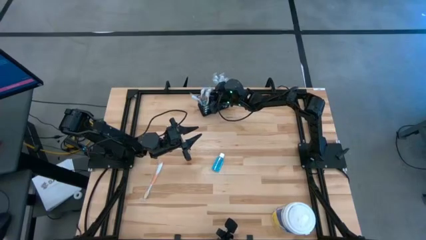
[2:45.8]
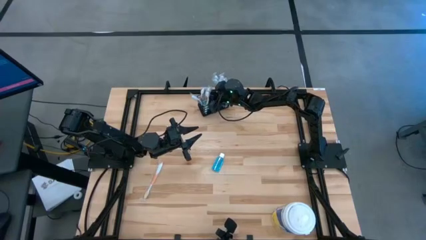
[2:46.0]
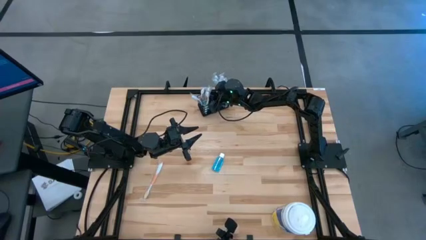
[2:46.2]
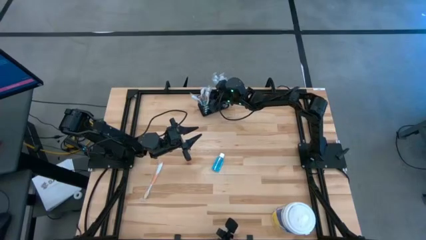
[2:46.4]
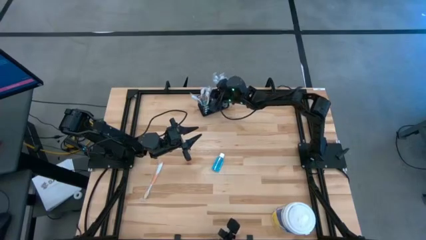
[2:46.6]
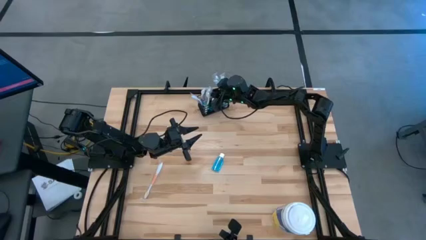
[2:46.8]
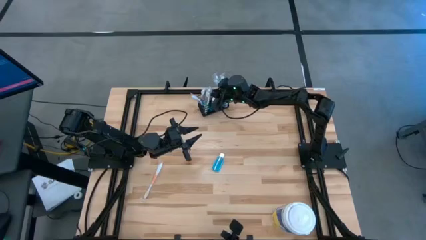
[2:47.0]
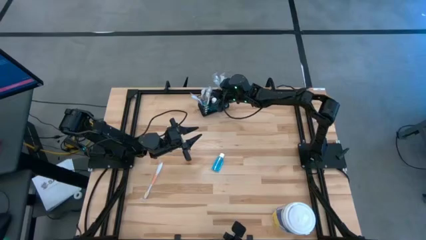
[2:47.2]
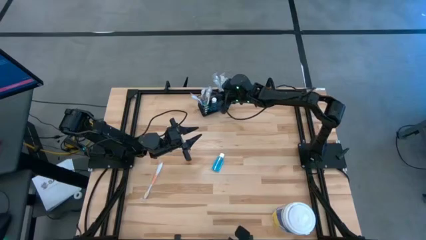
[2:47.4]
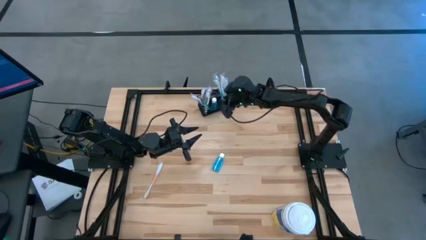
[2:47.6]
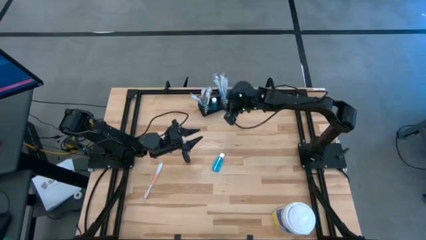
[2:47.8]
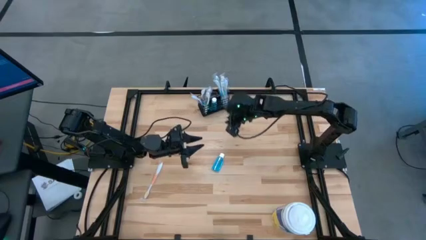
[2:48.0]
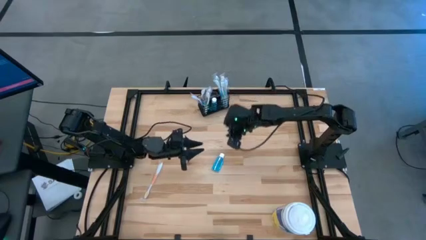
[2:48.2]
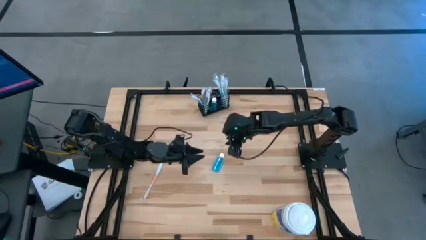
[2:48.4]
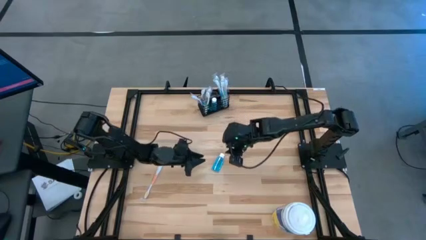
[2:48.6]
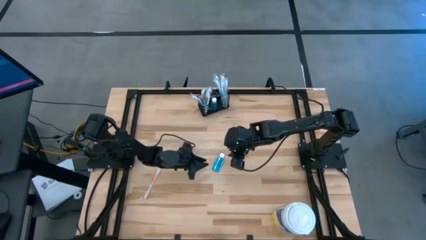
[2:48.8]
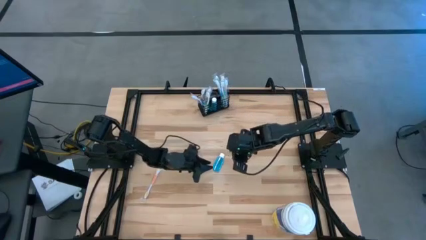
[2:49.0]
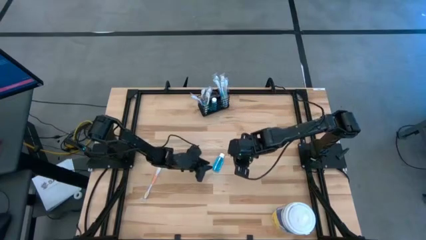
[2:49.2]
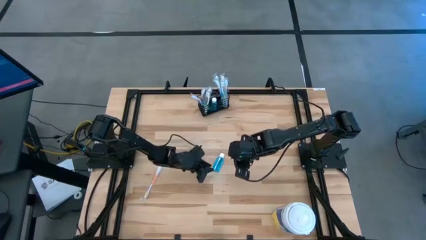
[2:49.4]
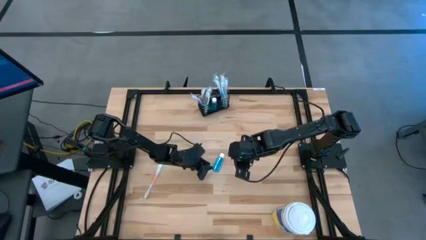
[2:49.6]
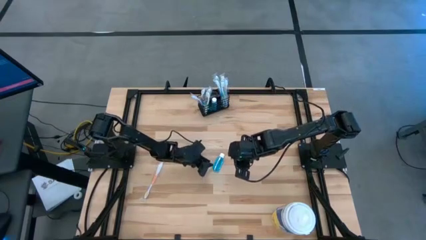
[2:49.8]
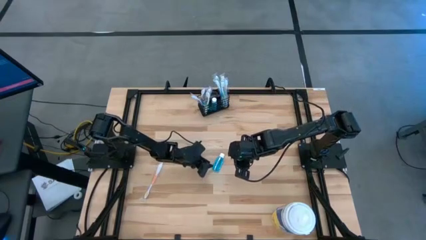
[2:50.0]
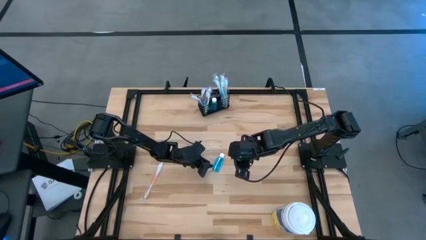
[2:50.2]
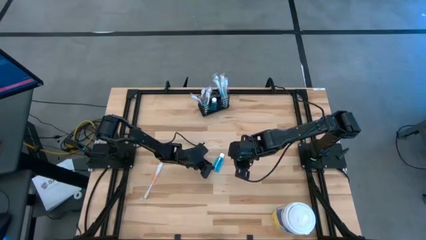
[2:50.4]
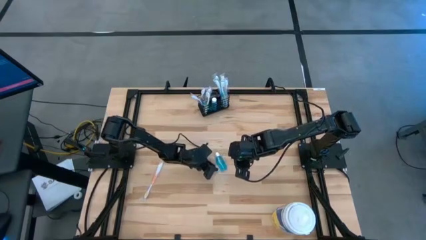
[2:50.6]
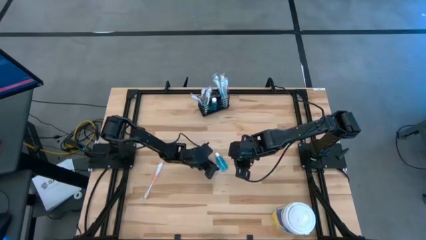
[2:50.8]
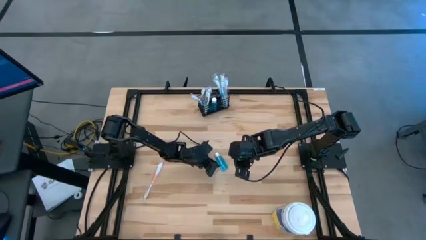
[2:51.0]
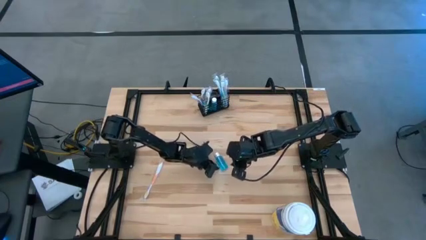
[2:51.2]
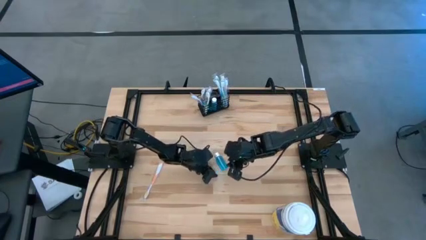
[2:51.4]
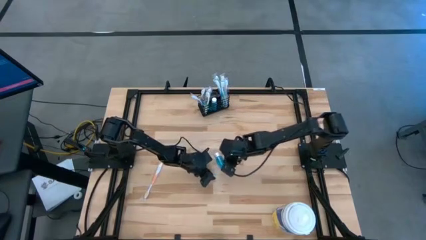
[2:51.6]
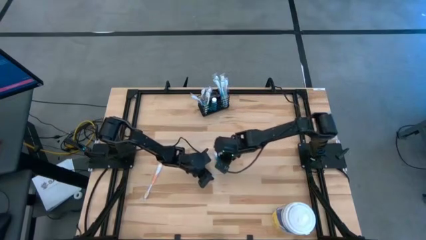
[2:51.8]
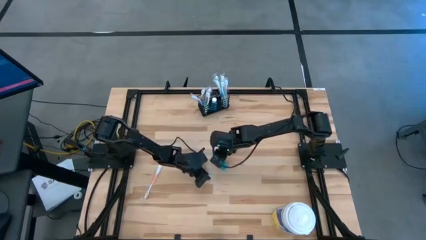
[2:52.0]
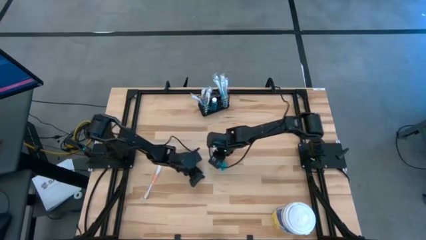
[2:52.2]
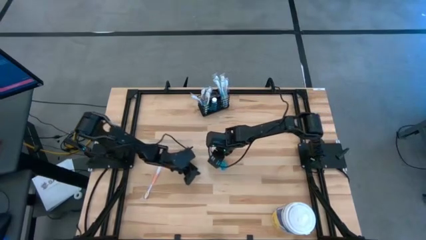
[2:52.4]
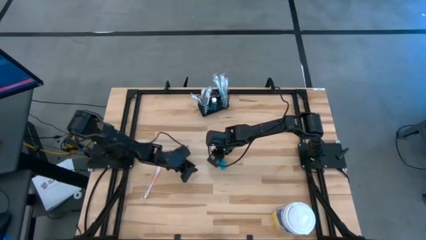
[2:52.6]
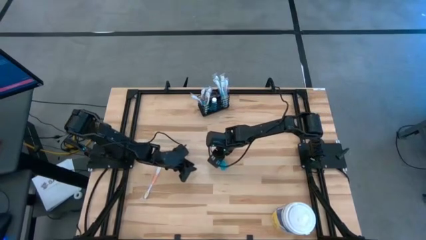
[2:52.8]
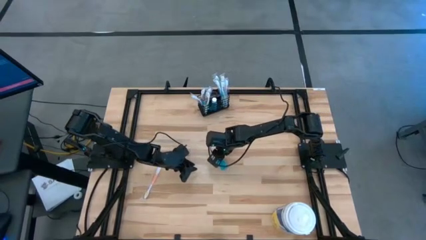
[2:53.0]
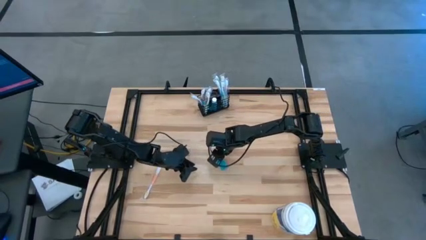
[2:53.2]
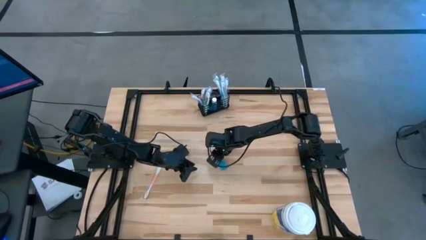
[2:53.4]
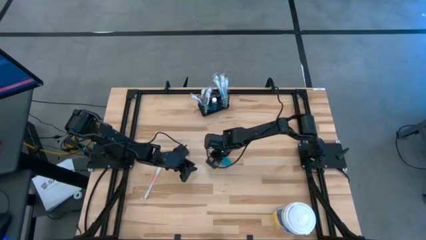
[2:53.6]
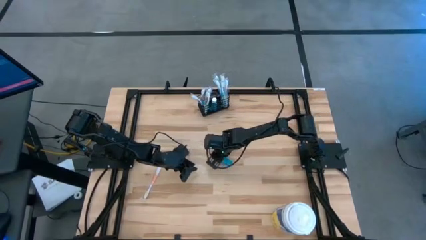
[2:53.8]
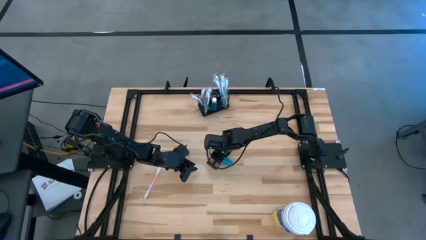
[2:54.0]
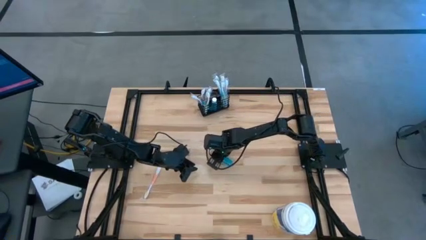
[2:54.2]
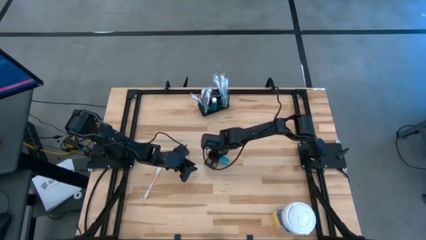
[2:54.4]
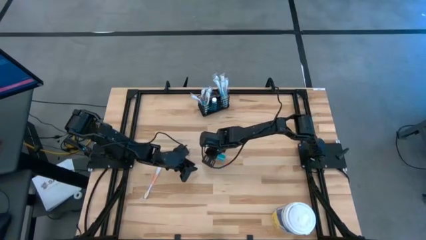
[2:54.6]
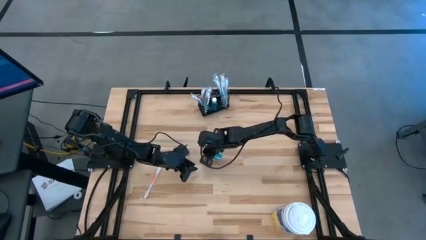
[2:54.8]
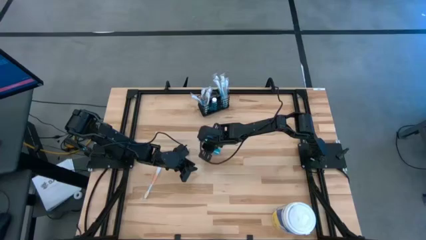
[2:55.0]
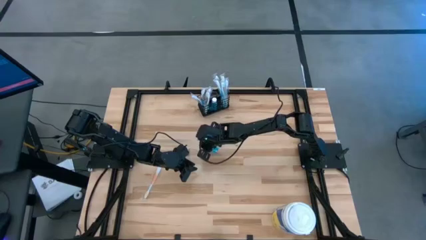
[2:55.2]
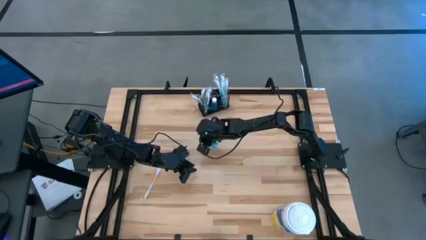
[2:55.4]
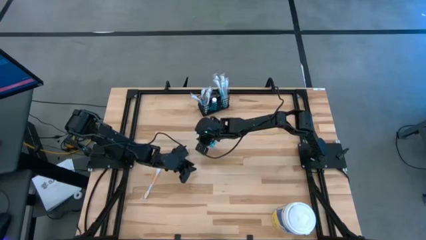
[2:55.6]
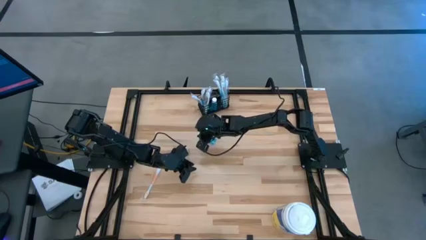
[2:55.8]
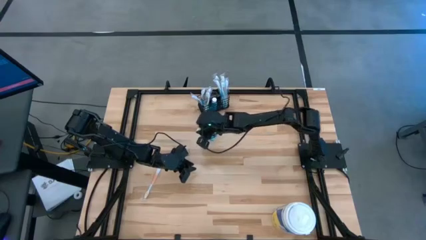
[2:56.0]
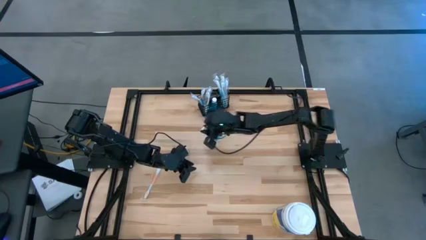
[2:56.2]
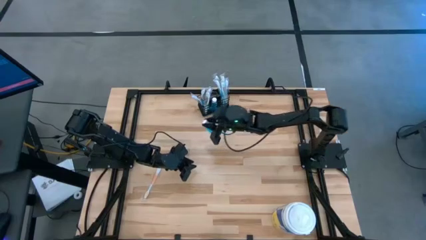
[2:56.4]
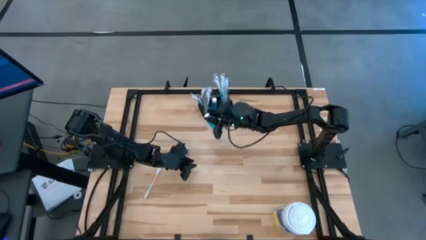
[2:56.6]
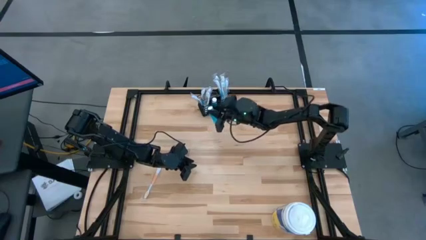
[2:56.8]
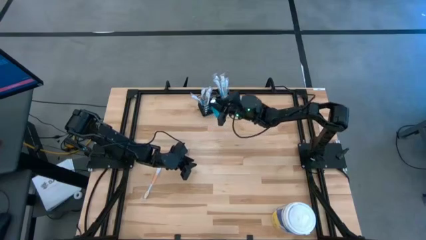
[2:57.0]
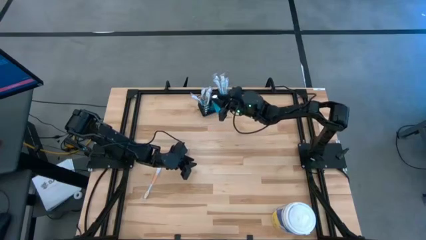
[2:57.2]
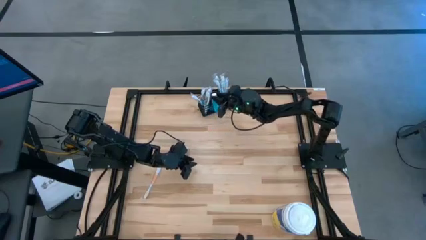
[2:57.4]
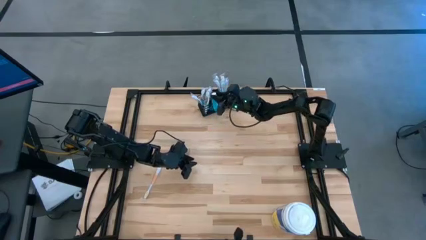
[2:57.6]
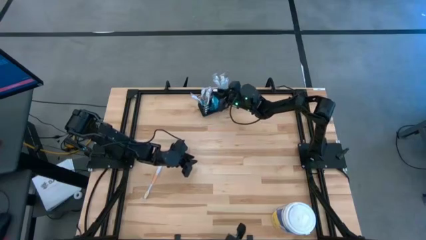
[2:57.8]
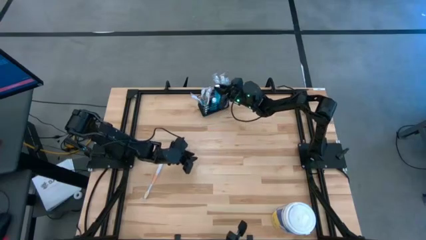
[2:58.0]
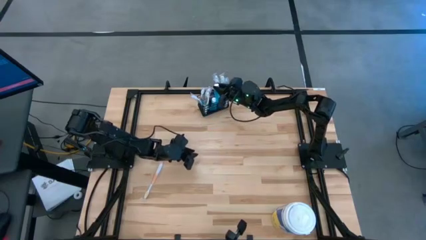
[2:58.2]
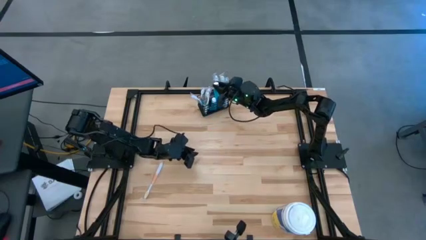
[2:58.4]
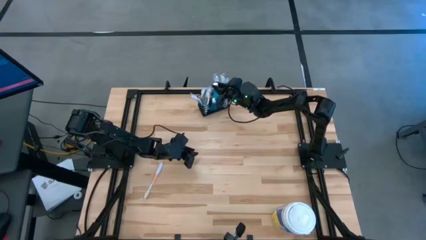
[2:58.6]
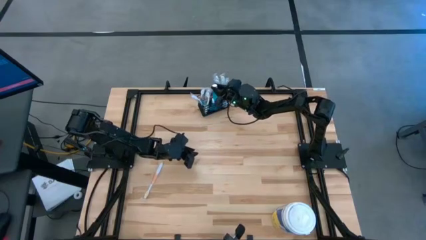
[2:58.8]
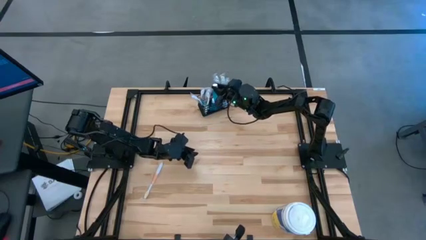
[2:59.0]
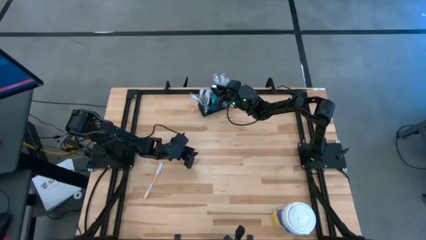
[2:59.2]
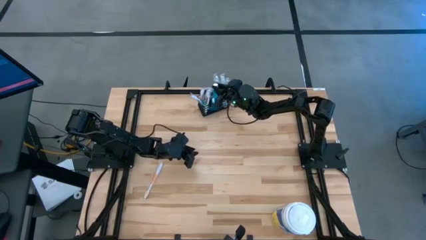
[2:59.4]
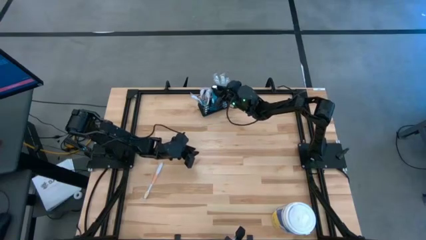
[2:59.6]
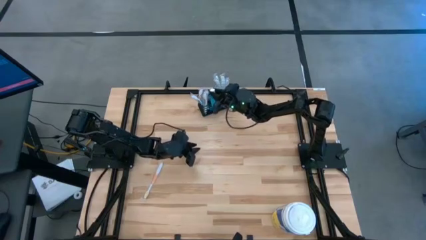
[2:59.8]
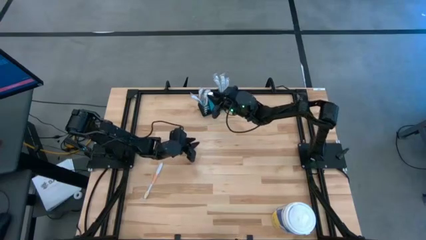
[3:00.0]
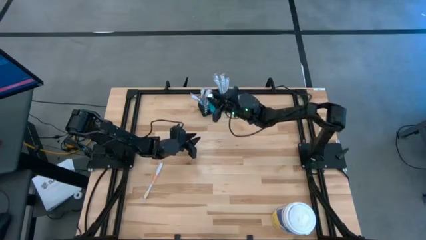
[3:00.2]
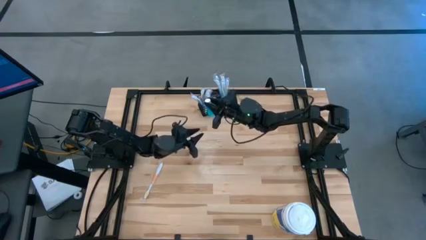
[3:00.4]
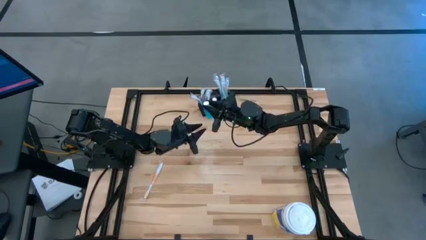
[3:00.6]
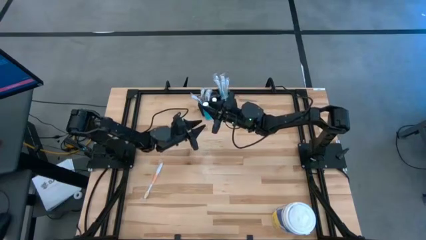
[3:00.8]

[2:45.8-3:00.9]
Task: Pick & Place toothbrushing station
Put the blue mouthwash into the black wire organizer
